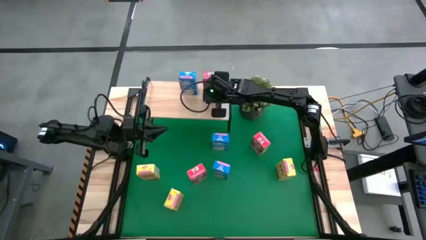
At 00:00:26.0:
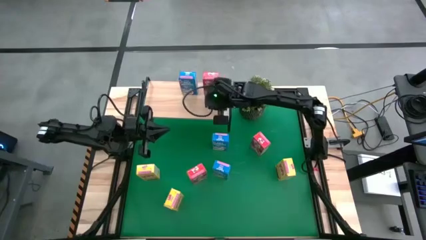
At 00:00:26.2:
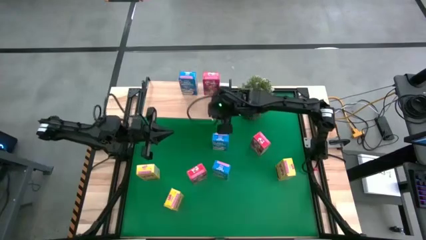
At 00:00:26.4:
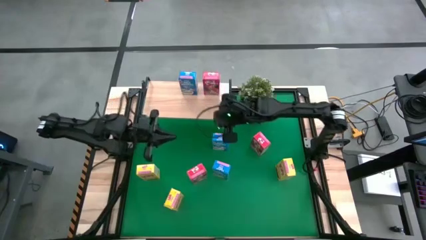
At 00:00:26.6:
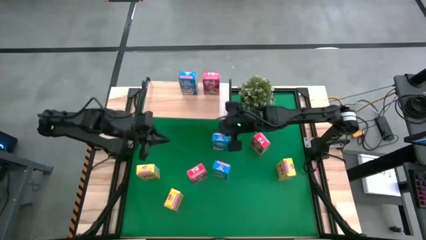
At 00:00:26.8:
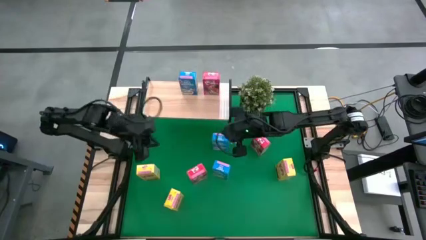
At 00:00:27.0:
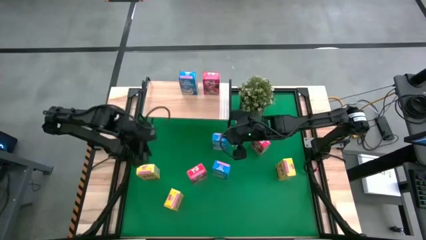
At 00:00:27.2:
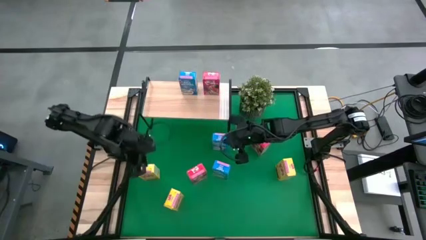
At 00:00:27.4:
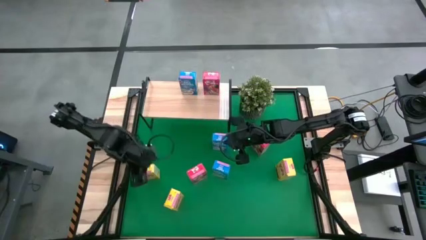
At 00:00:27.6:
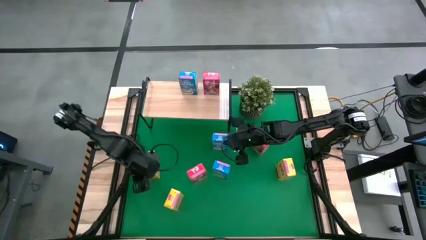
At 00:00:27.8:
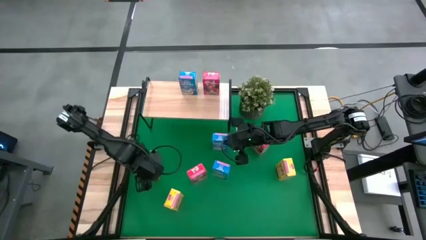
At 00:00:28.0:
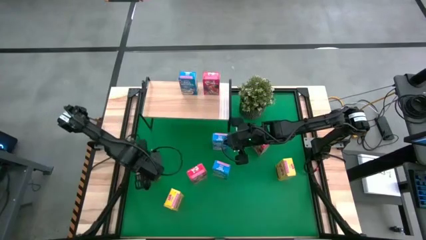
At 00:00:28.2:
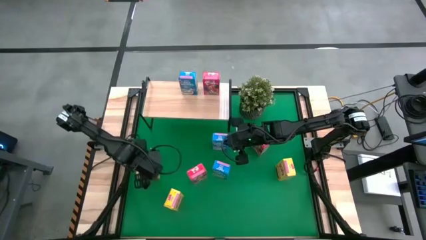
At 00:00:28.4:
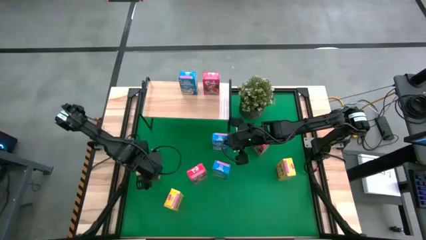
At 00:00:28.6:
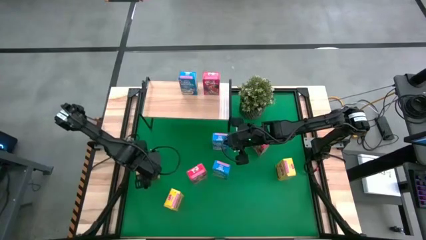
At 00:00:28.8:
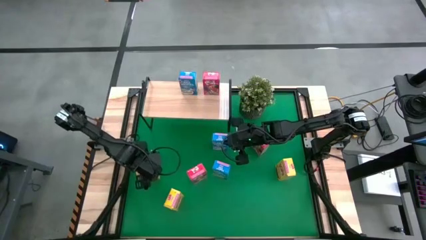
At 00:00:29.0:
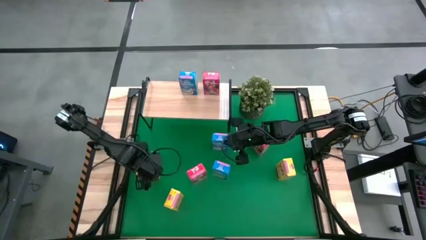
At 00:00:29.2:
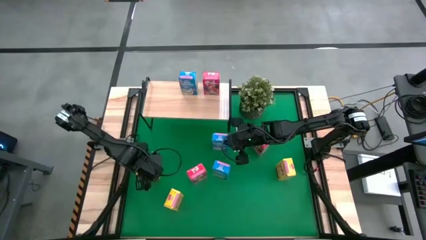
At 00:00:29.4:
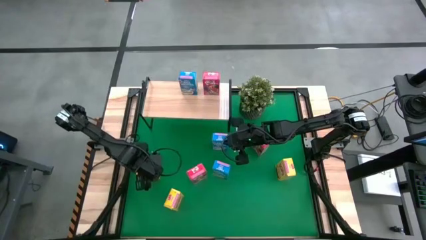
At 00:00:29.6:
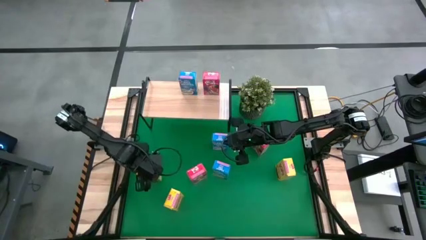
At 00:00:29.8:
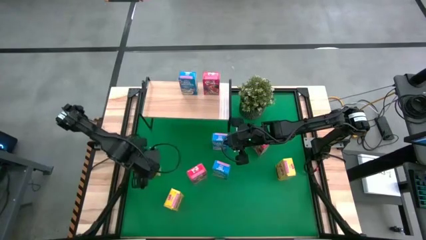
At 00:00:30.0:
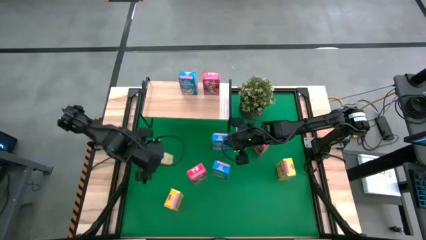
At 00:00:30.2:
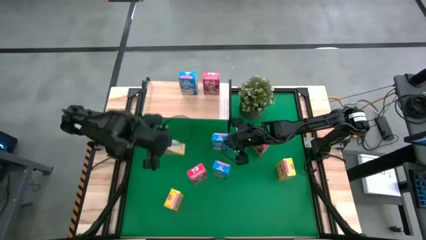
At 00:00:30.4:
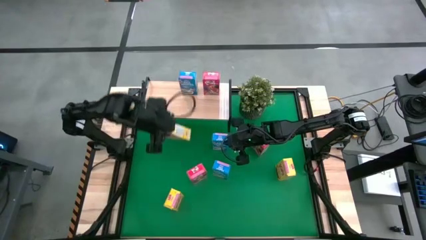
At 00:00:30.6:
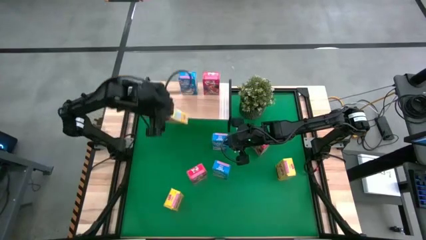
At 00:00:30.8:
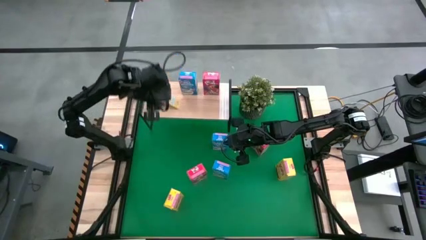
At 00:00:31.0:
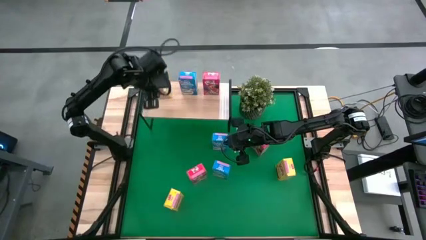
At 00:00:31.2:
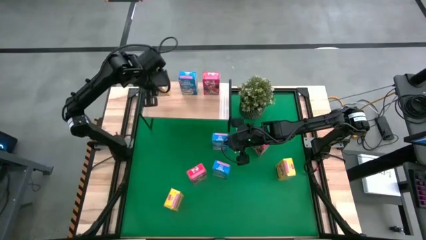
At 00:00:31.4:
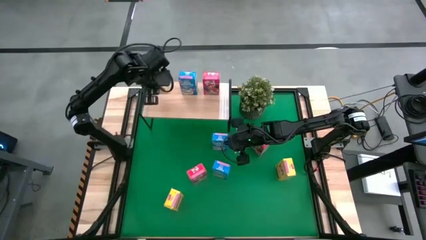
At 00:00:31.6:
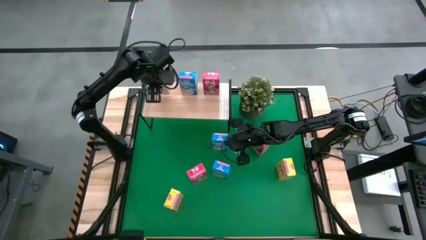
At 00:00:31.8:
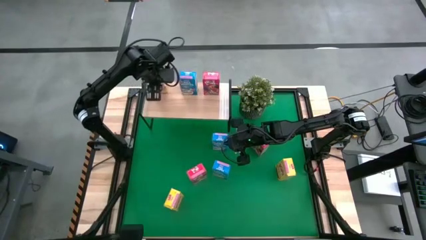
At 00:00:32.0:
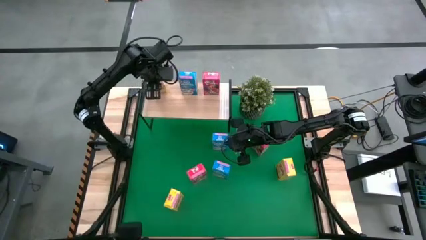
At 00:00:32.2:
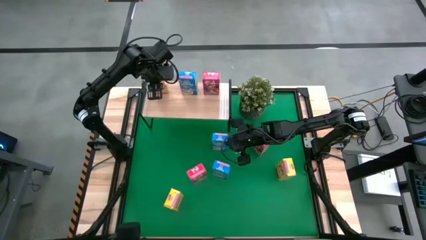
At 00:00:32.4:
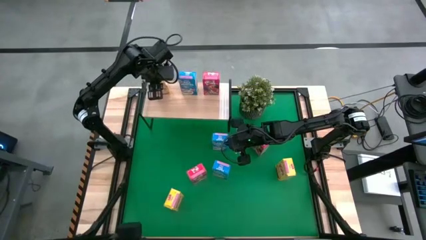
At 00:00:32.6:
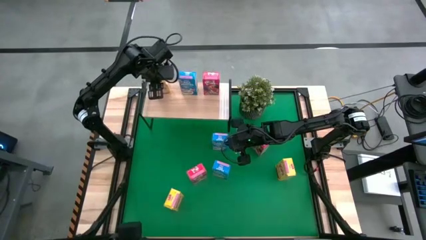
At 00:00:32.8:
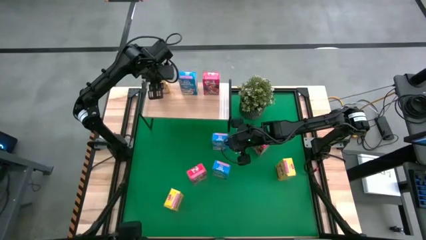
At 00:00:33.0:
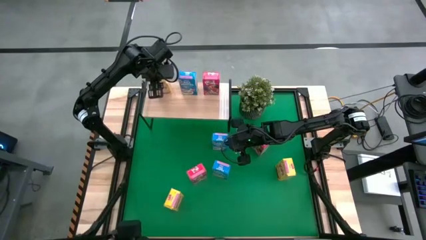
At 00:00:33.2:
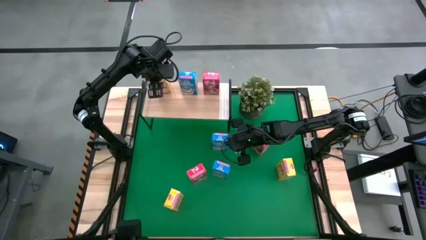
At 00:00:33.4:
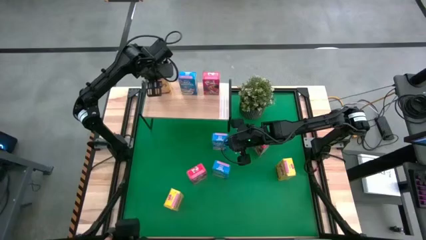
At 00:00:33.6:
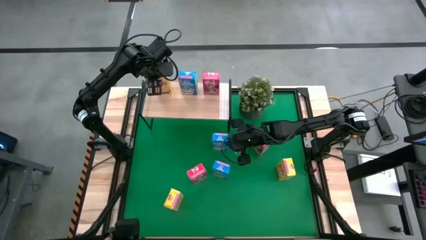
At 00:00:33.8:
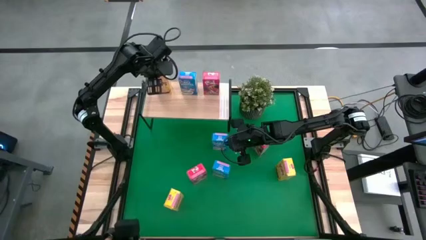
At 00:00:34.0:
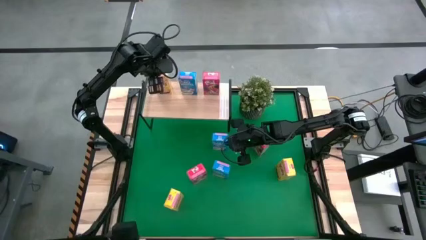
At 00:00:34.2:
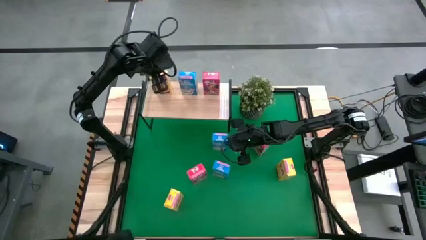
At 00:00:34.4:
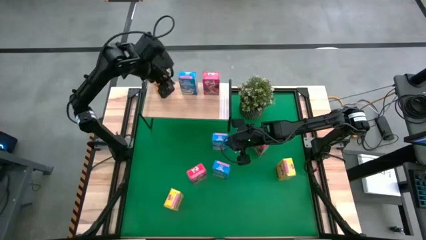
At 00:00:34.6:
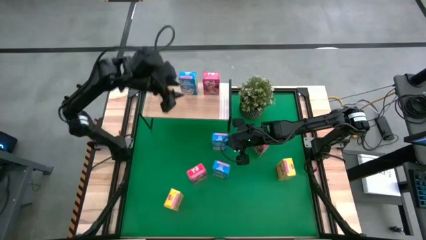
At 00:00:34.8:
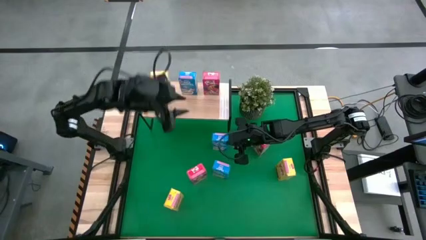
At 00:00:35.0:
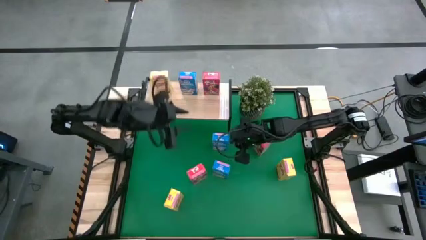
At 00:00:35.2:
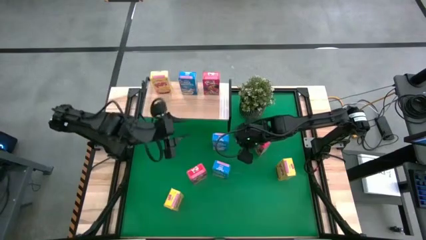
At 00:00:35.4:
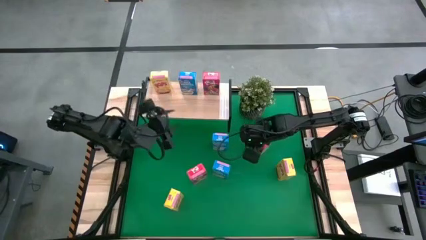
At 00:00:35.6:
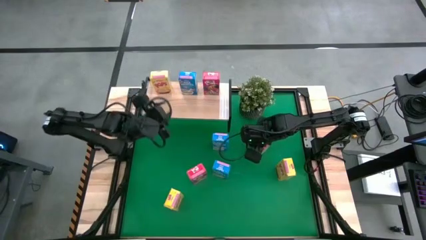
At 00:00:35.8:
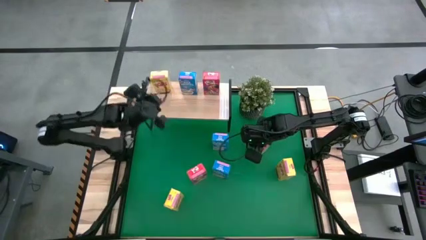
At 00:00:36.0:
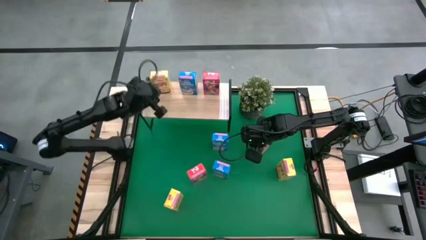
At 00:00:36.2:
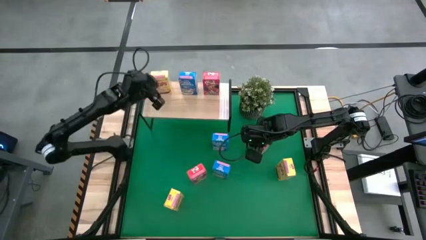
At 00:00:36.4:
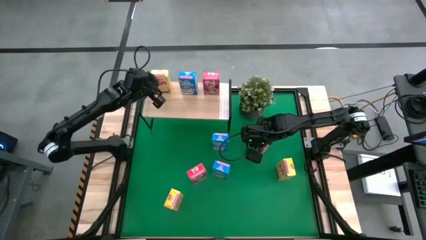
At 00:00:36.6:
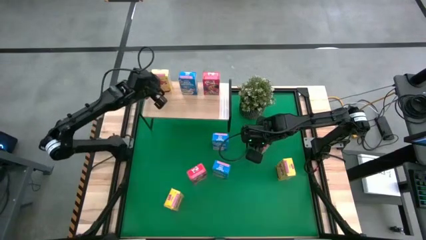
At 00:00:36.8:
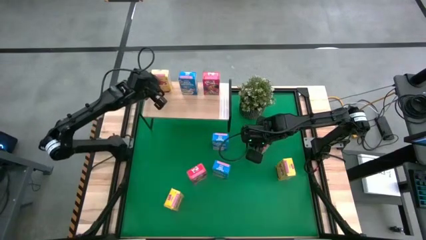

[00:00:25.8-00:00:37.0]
Task: Stack cereal on shelf
Put the top left yellow cereal box on the shelf

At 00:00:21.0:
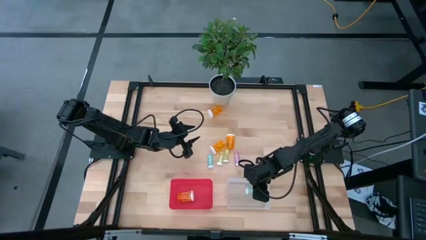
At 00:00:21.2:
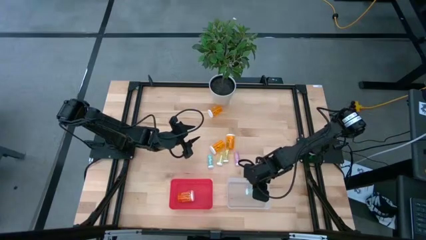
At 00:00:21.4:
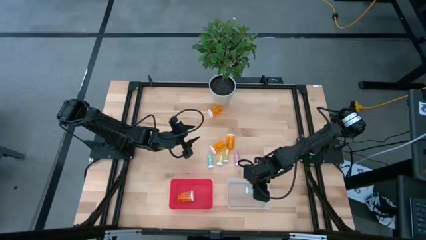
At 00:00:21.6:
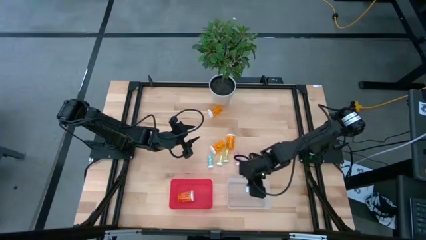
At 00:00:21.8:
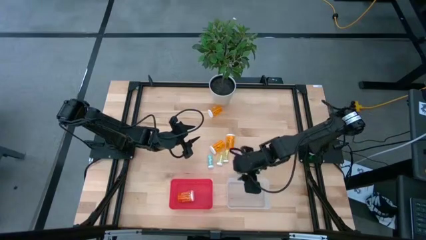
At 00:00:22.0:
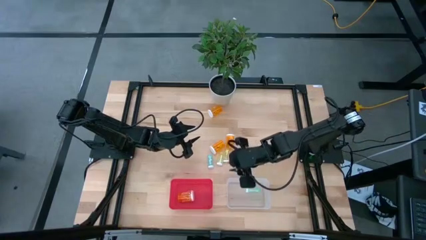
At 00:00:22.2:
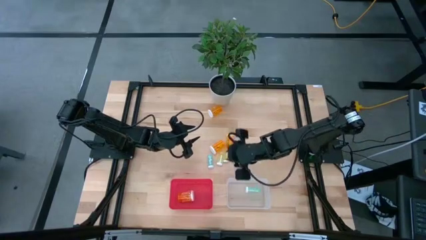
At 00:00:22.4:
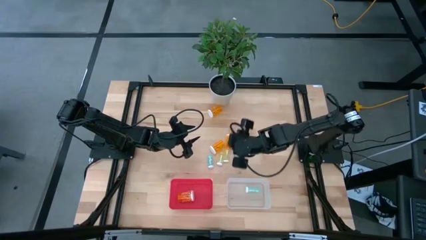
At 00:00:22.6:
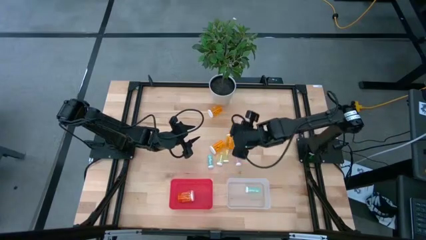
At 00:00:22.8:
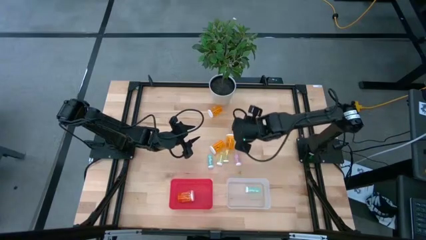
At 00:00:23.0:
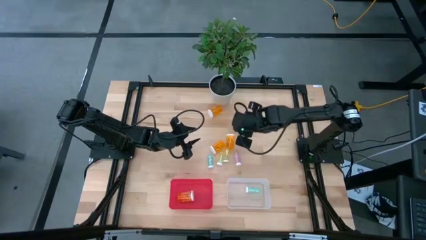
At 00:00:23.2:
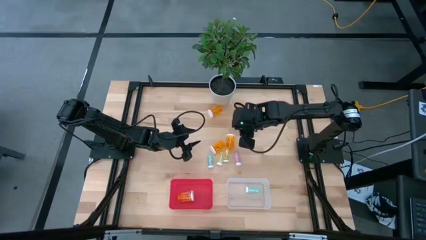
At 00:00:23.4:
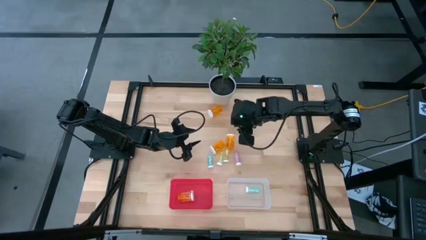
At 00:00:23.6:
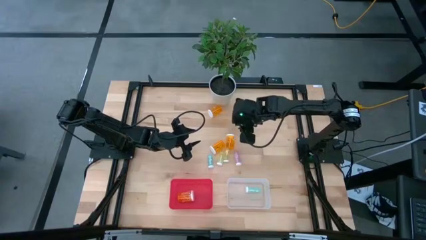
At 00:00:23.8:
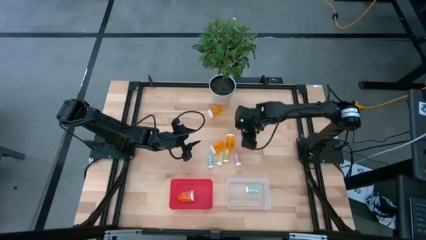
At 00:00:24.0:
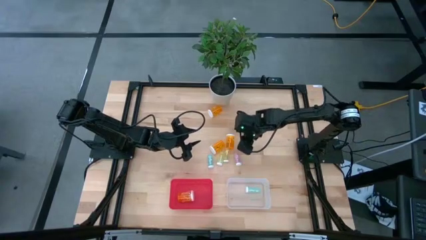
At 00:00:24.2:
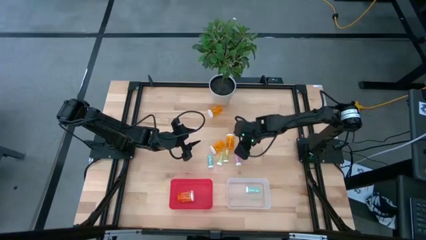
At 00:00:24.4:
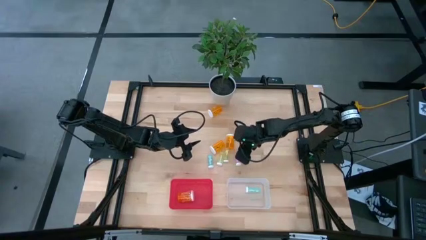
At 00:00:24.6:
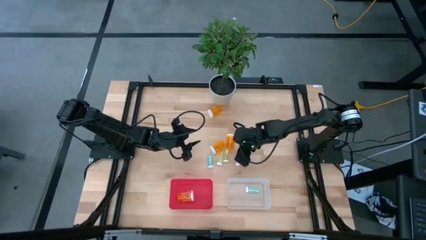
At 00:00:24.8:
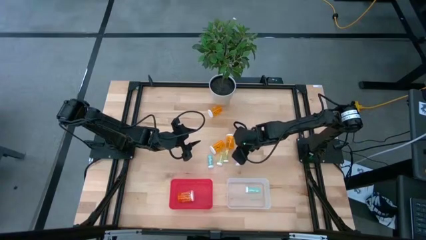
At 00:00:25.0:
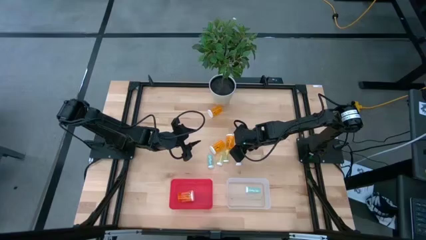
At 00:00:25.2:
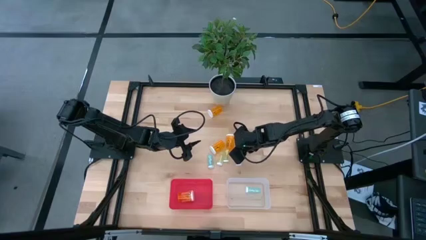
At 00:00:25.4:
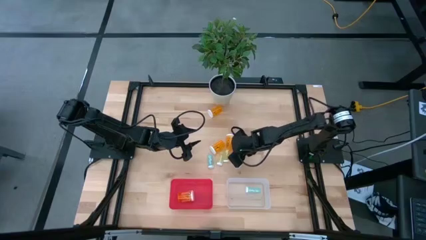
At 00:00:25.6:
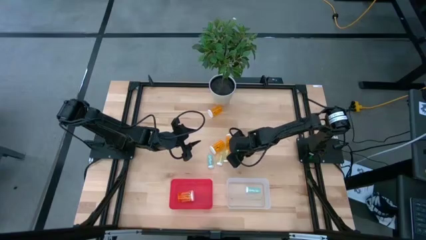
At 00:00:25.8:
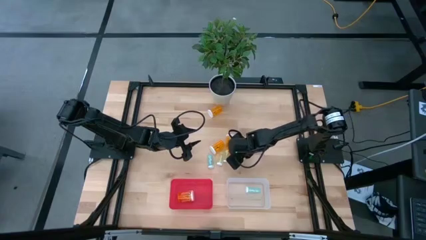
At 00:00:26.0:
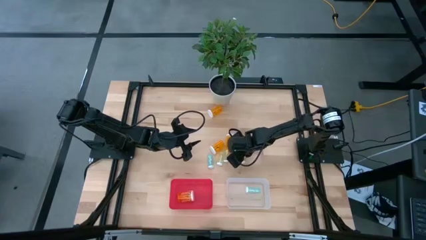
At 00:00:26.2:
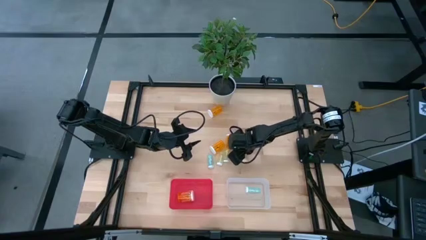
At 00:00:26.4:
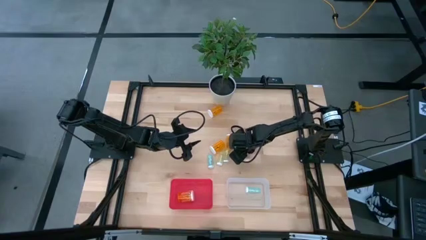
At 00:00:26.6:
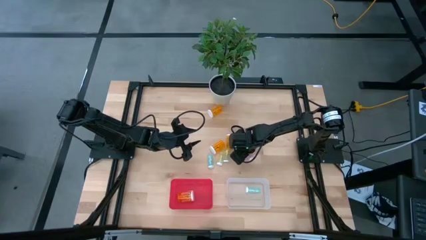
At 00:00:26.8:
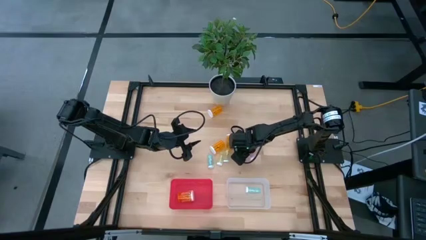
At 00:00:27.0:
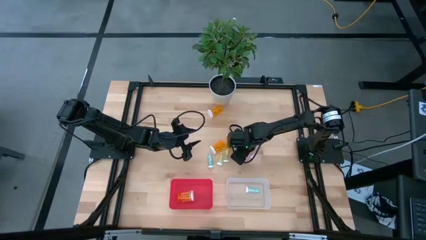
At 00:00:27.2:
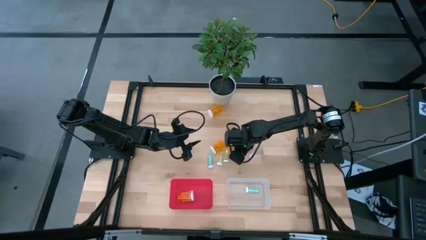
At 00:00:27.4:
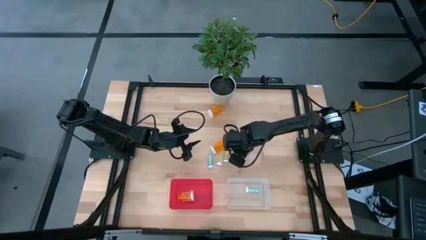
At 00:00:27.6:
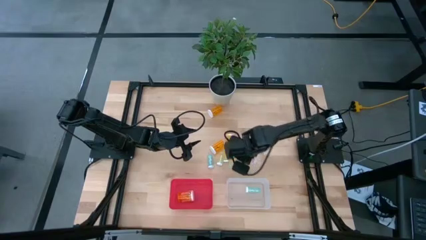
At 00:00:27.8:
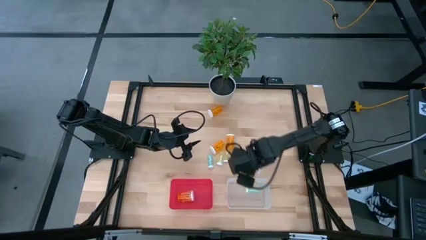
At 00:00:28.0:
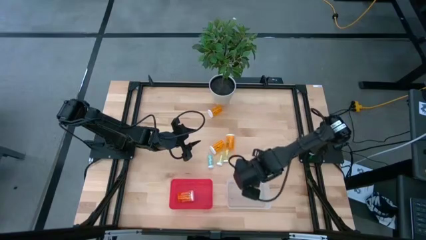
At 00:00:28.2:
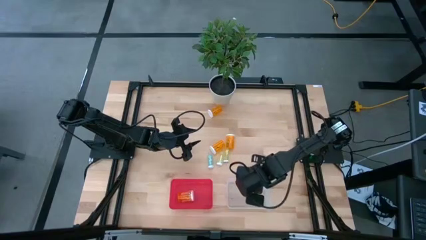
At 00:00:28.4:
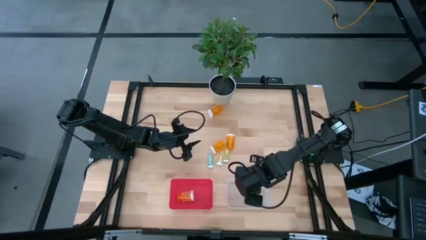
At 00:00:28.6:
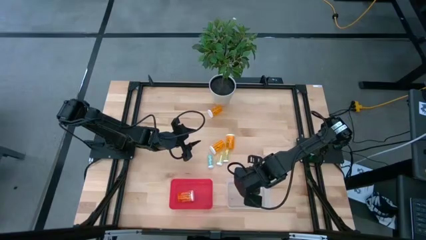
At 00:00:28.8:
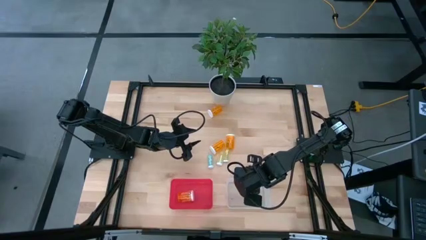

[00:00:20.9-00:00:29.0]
Task: Pick and place medicine bottles into bin by pill shape (circle, oval)
Put the small pink pill bottle into the transparent bin
